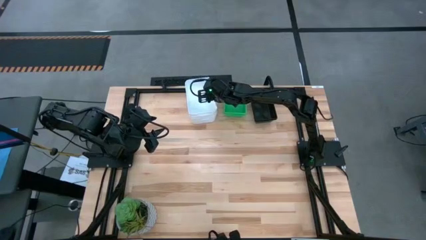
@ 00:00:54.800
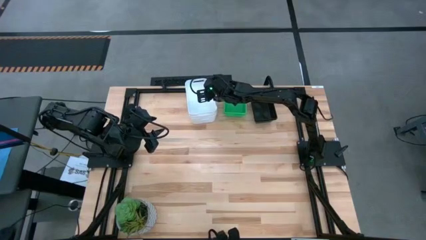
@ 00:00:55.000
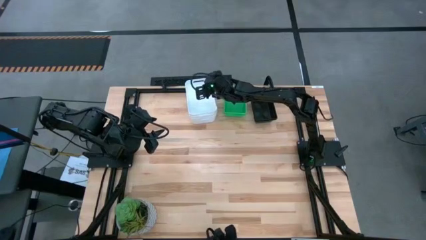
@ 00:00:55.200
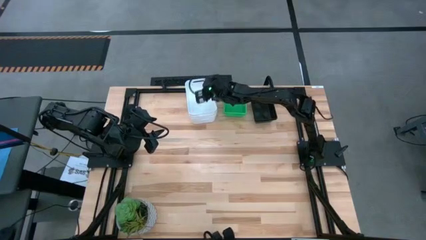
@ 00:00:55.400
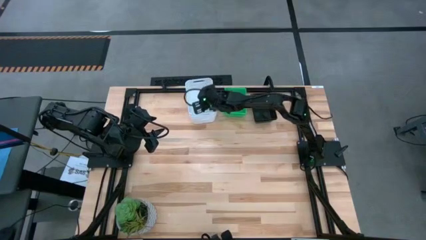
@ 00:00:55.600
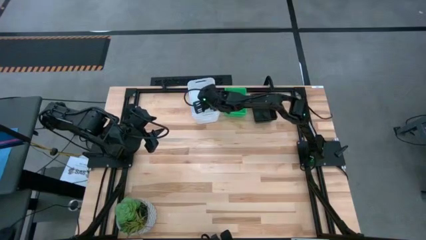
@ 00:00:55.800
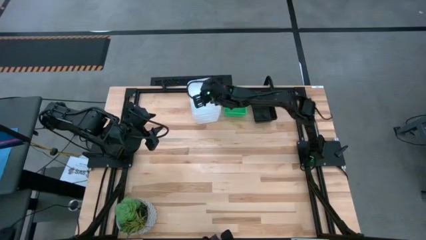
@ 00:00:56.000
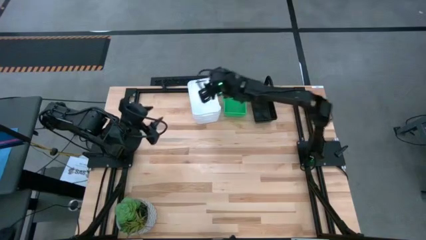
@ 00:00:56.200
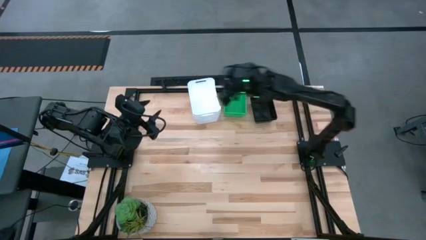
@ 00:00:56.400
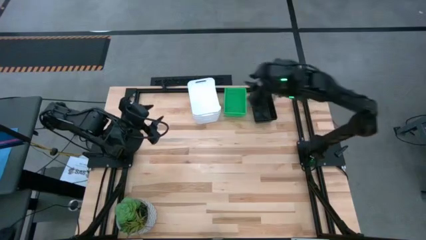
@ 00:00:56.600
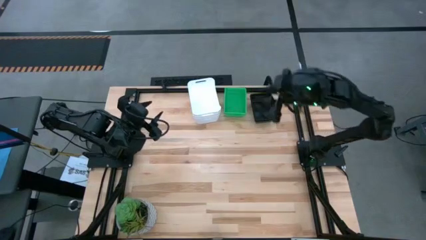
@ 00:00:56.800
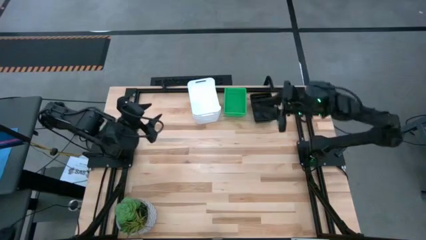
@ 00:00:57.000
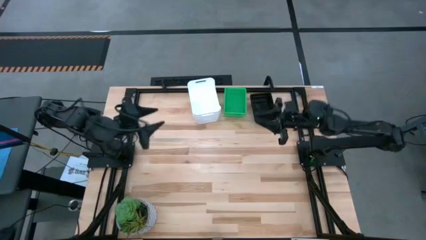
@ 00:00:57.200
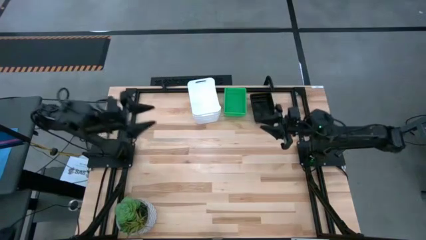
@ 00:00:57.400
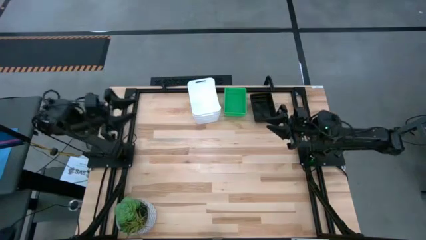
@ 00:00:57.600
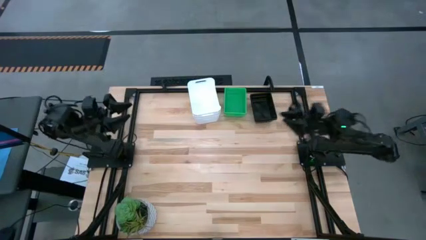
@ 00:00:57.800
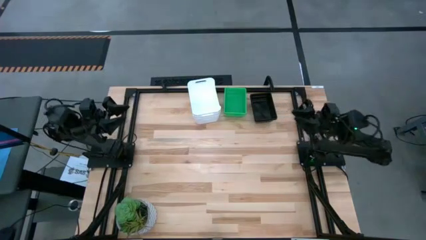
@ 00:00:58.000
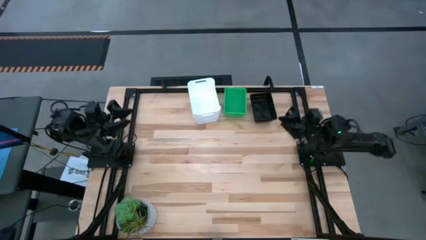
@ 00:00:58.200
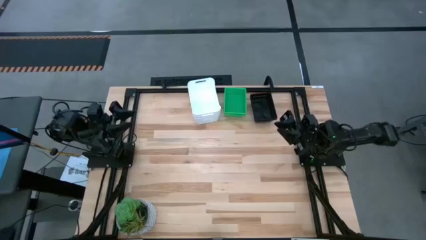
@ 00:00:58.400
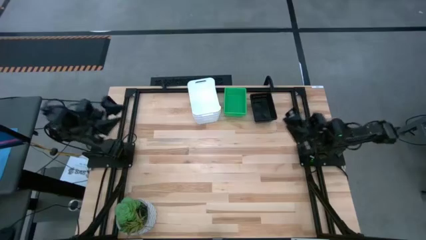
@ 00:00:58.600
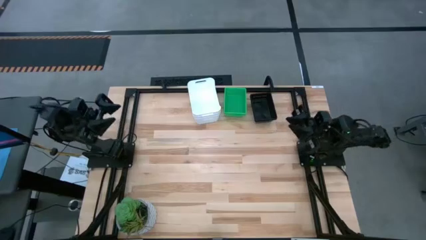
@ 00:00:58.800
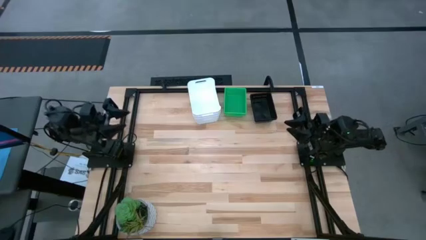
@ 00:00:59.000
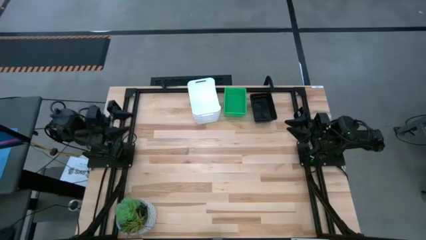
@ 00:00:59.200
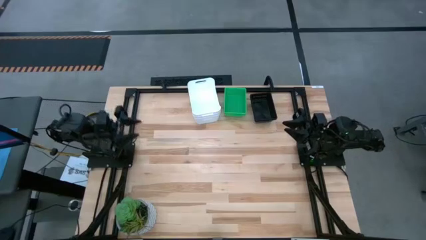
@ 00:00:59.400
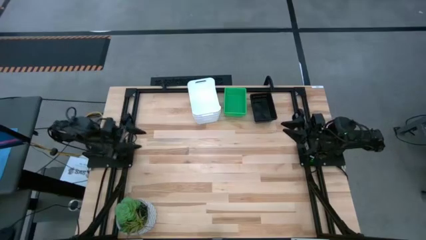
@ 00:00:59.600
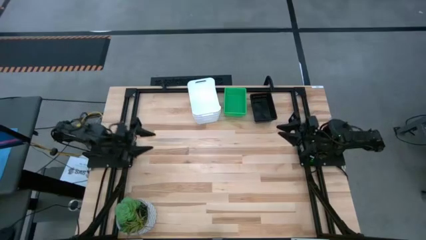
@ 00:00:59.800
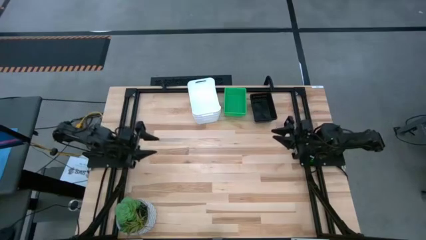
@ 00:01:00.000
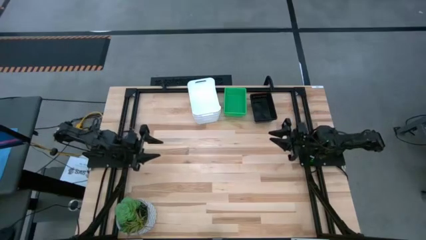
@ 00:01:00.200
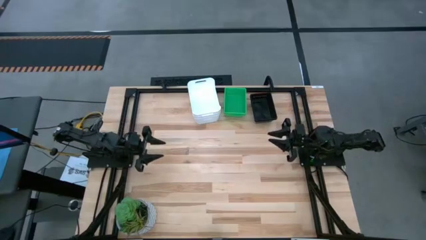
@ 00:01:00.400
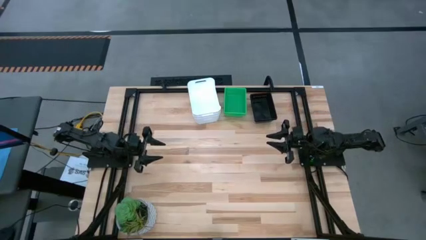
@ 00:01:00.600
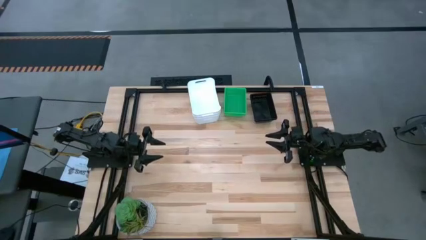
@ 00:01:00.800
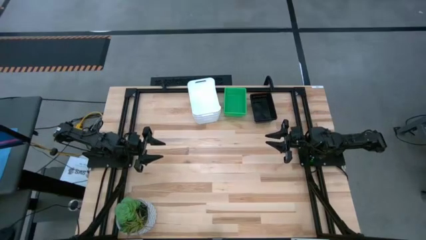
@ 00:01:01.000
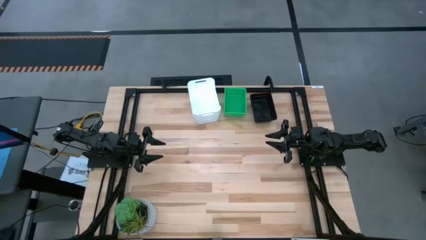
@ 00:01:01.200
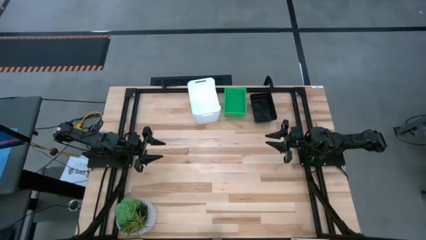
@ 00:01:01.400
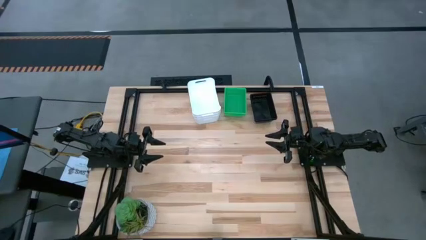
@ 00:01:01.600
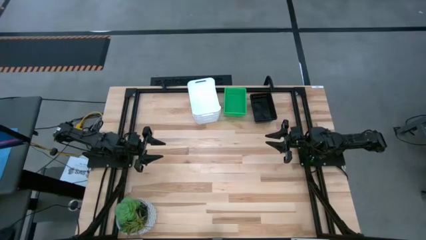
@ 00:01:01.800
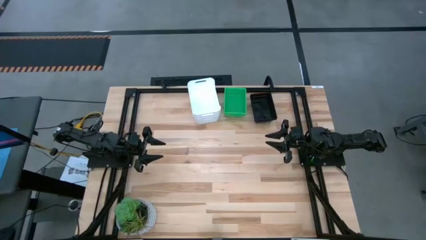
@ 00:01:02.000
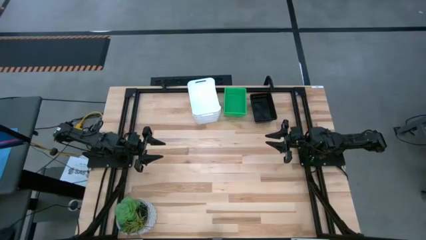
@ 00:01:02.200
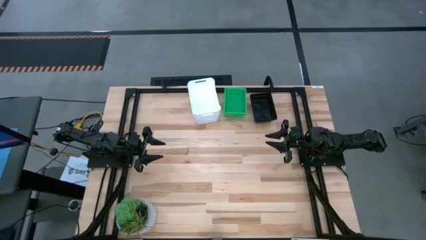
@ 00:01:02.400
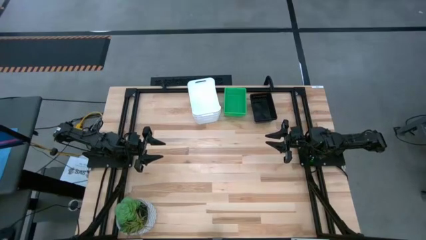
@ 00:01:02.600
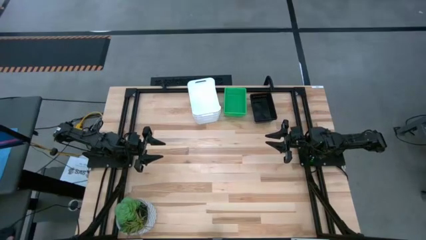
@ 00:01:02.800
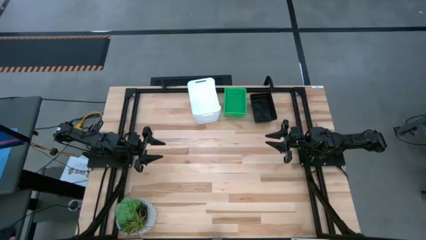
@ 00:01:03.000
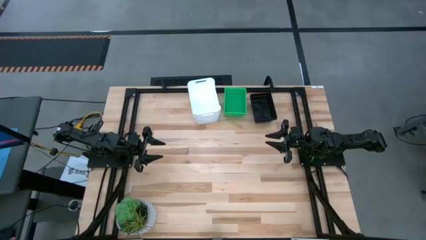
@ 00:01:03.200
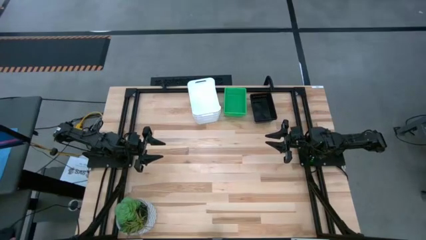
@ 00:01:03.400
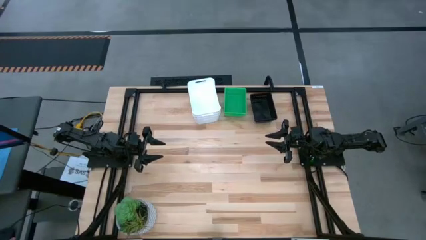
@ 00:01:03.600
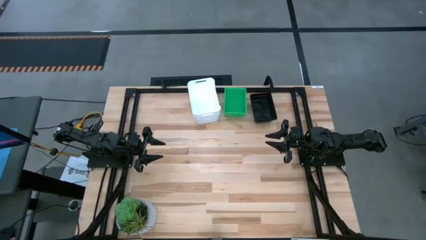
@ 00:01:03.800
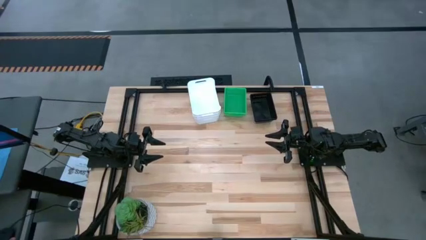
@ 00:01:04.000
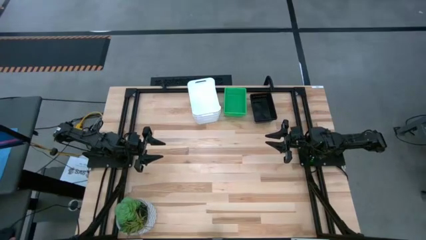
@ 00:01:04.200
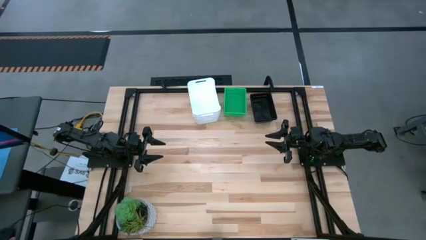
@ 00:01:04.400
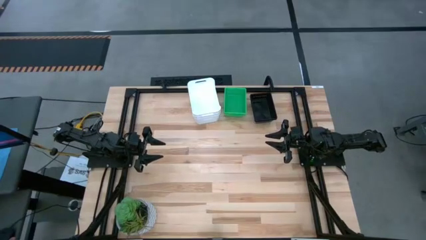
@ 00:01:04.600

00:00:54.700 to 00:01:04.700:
Return to Home Position
